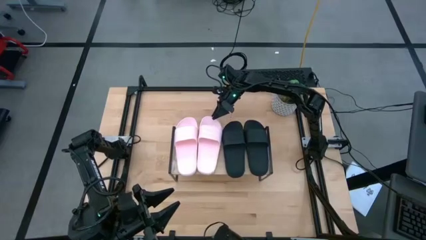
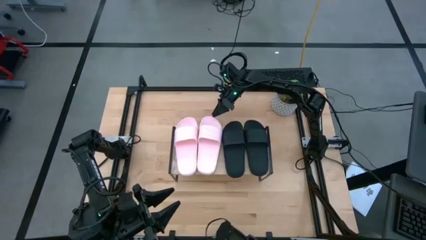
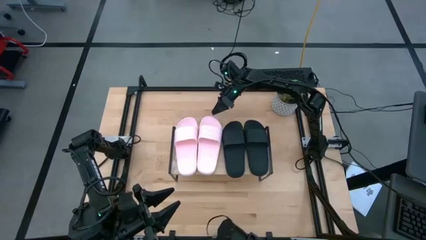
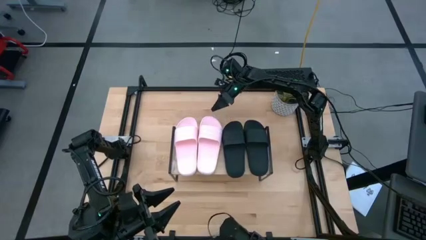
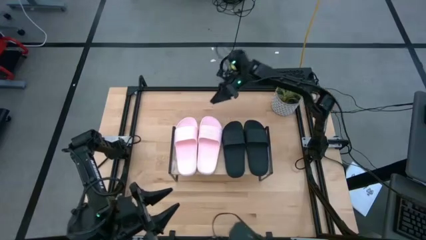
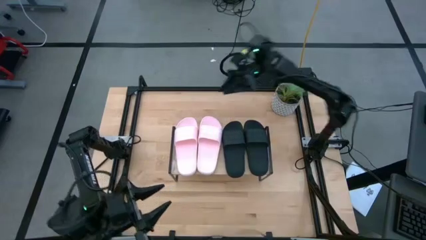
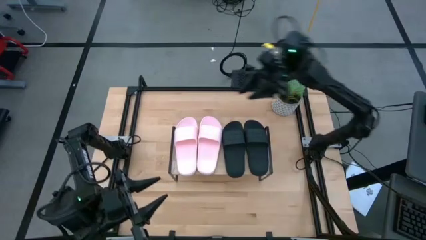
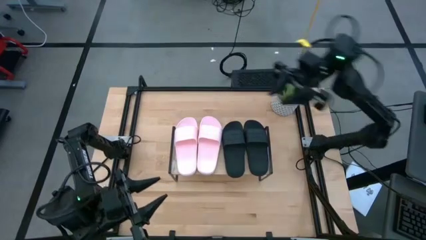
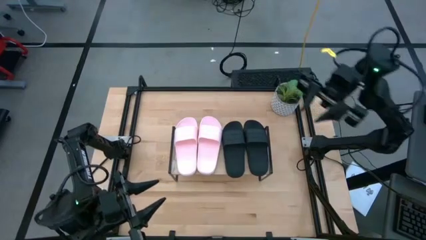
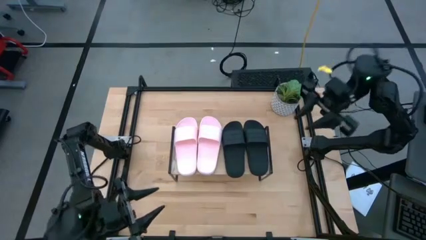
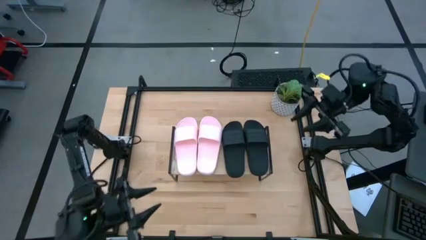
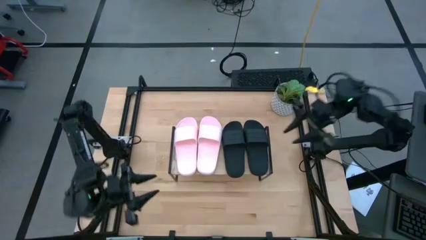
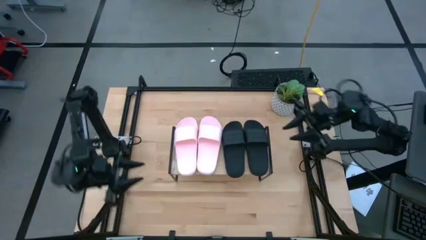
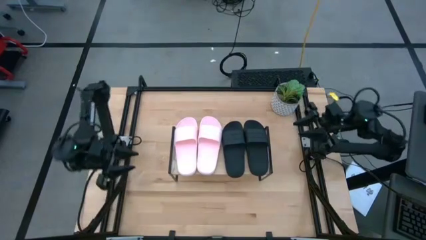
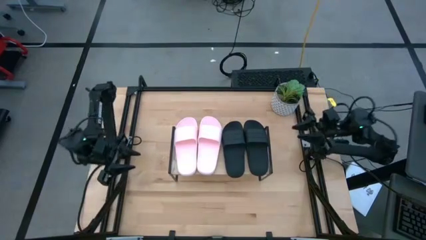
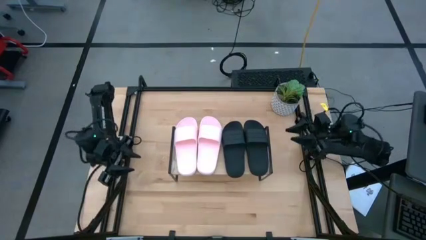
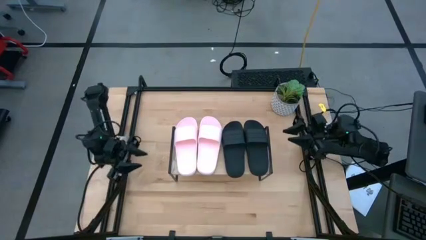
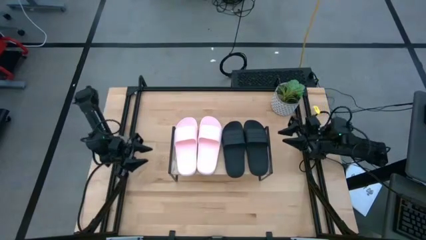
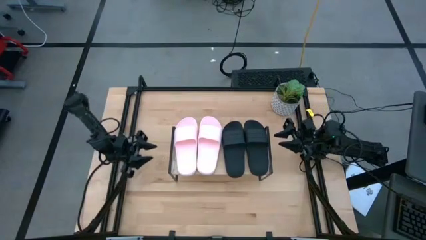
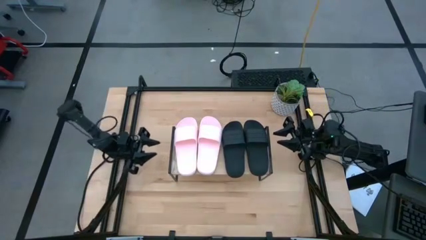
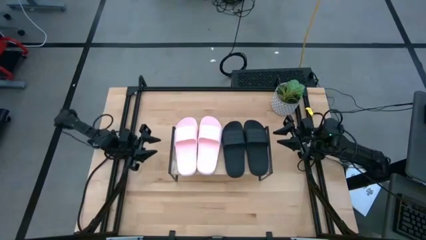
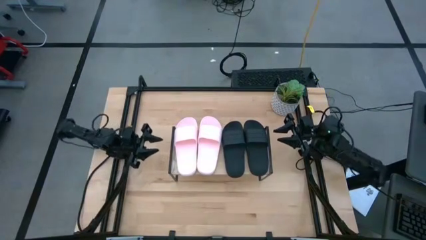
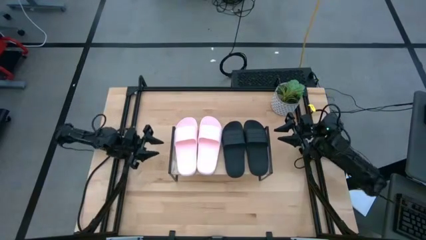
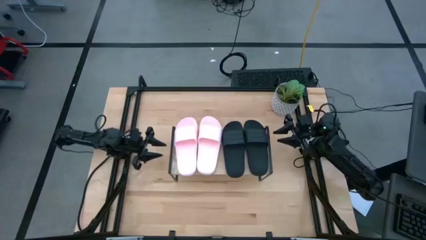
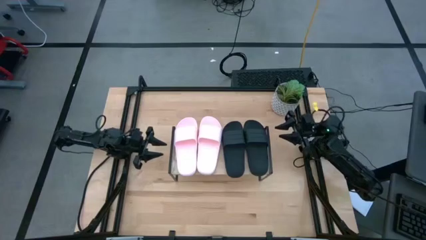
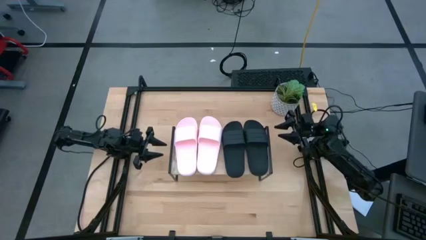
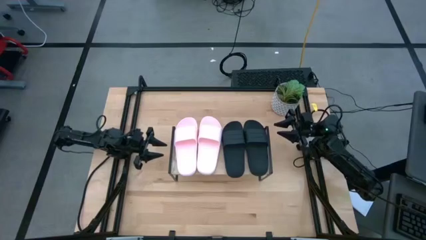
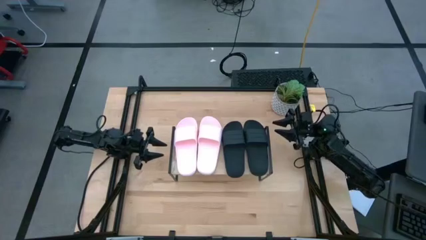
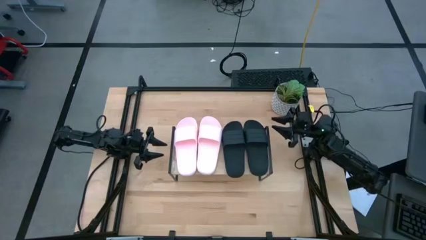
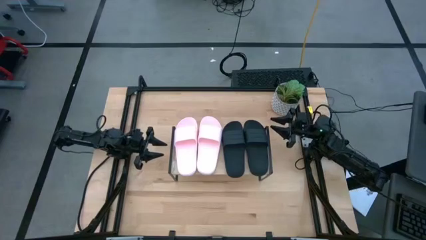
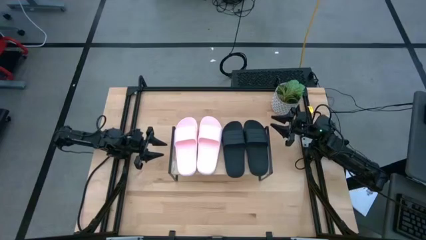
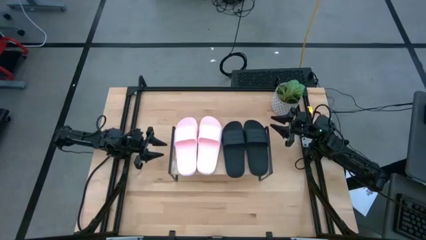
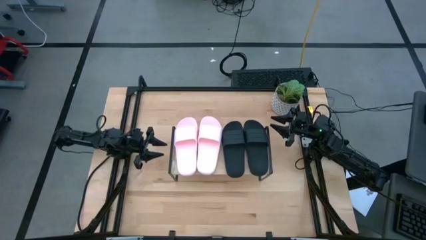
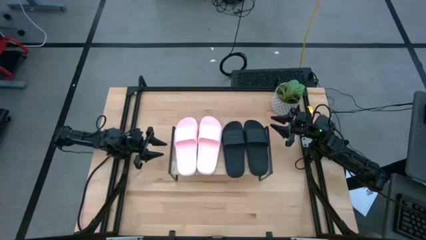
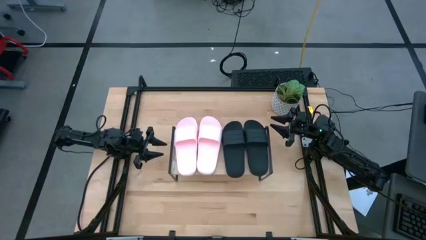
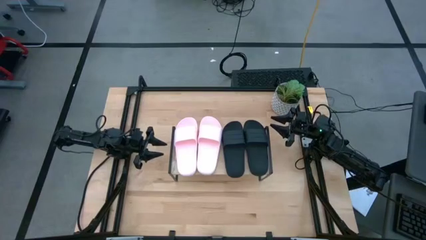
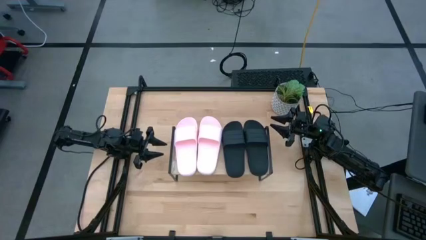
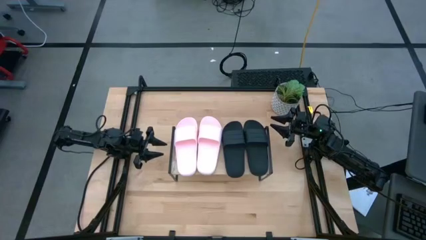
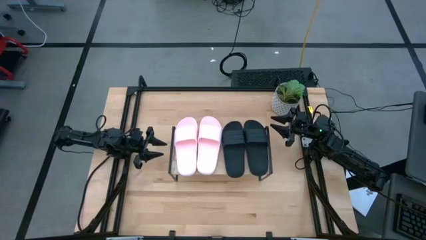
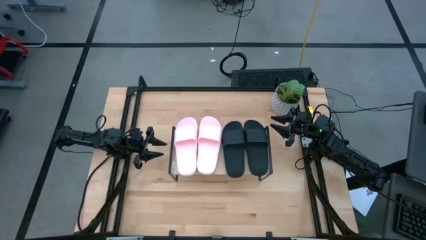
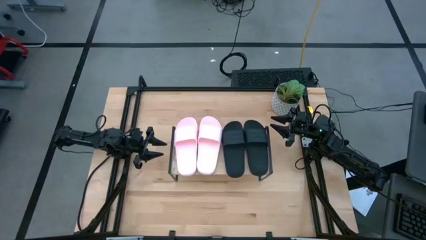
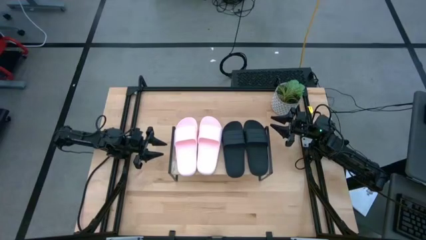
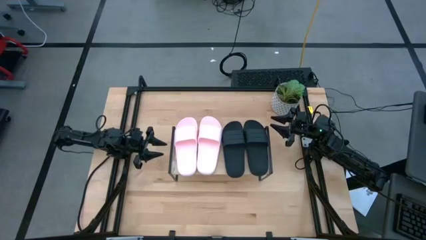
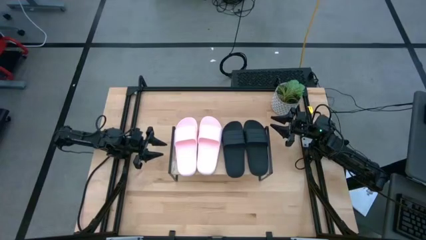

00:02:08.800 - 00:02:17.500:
Task: Pick and place slides into the shelf
Return to Home Position
